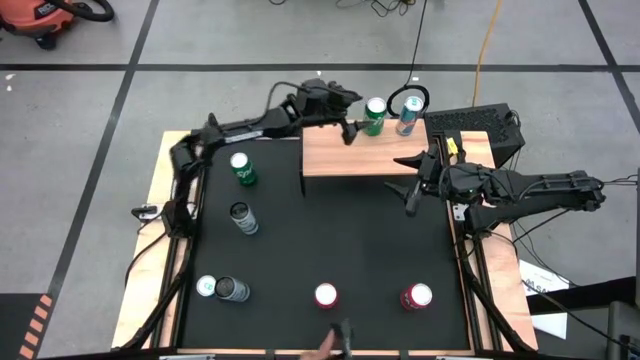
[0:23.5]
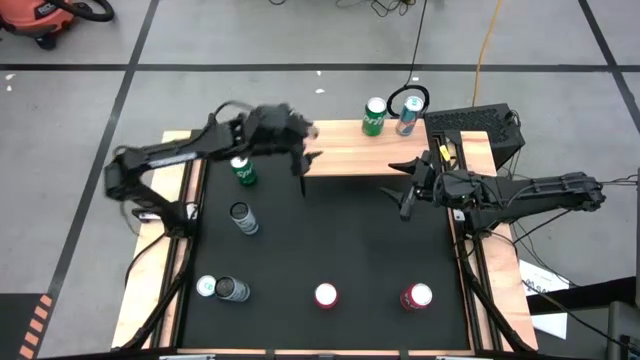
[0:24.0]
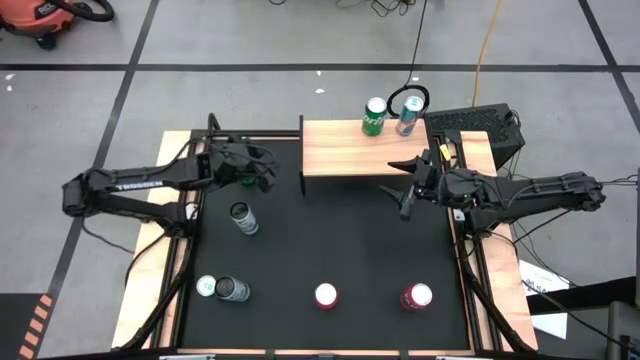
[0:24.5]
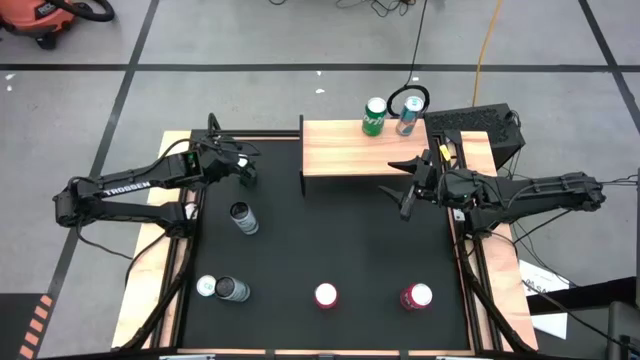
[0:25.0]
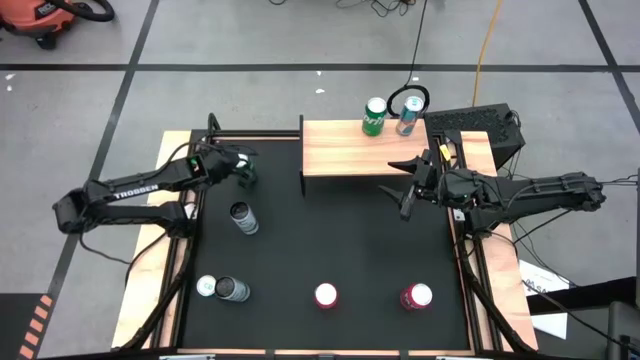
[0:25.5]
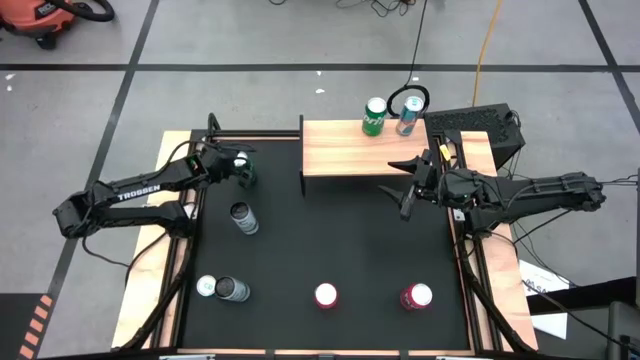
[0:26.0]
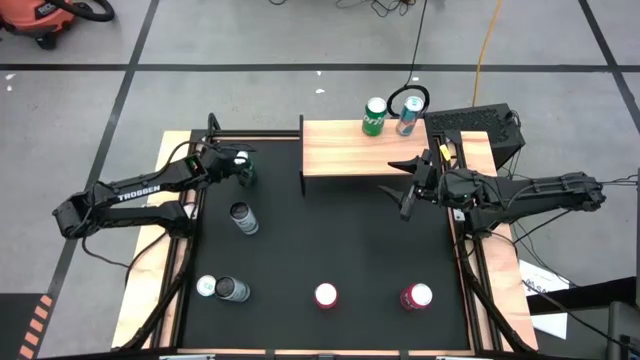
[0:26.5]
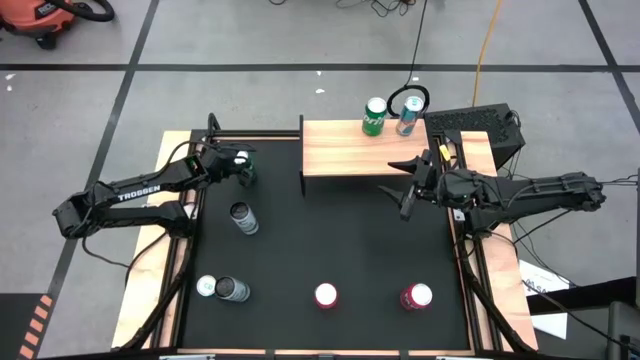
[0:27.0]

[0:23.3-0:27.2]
Task: Place canned beverage on shelf
Put the green soda can on the shelf aligned with the other green soda can

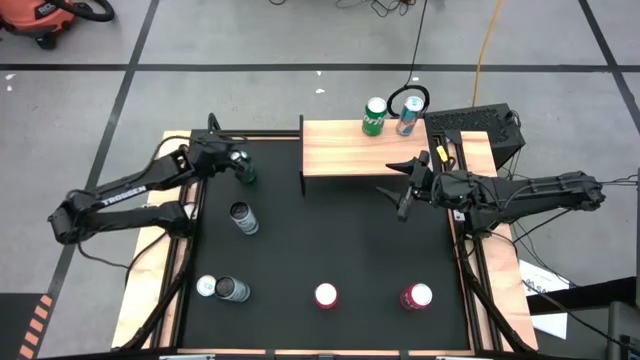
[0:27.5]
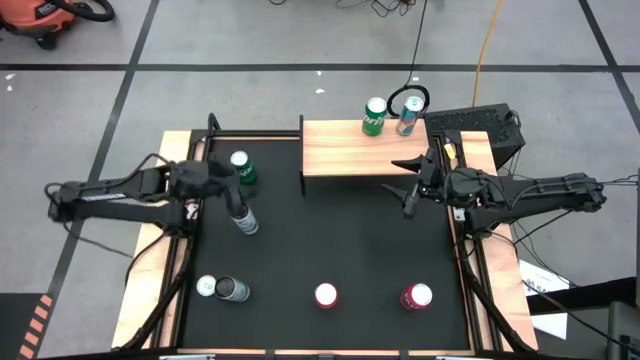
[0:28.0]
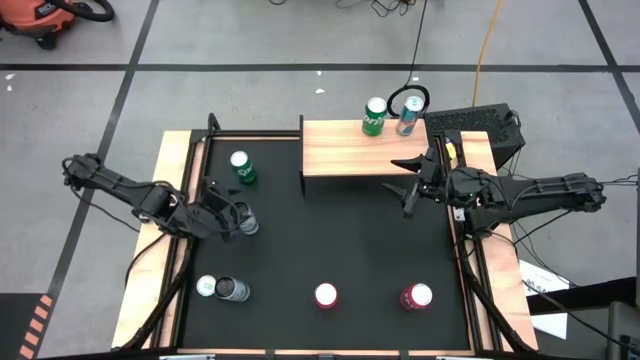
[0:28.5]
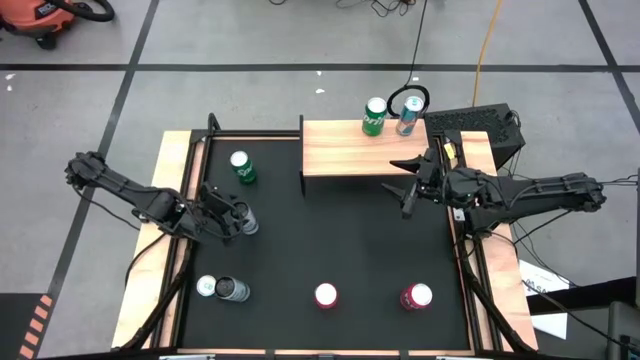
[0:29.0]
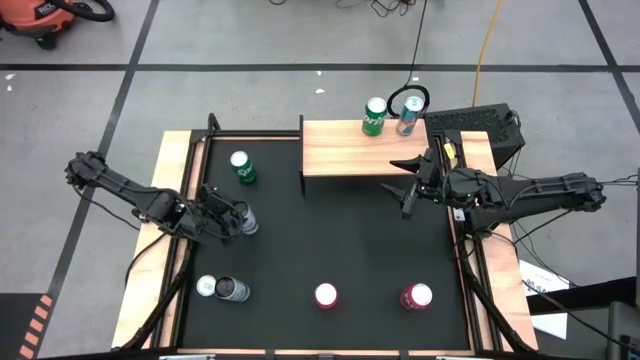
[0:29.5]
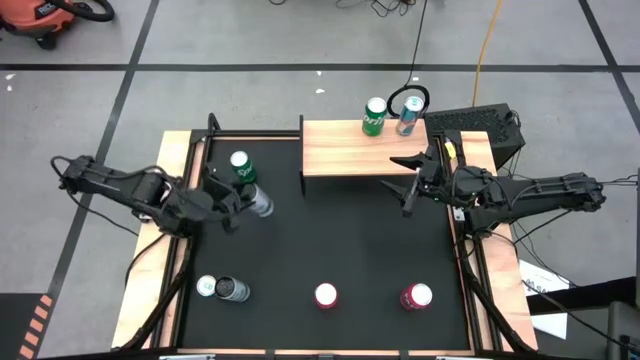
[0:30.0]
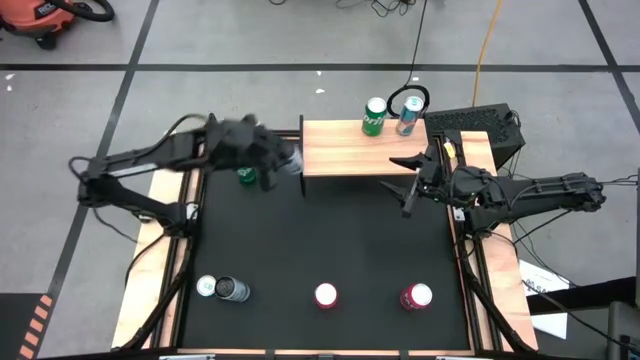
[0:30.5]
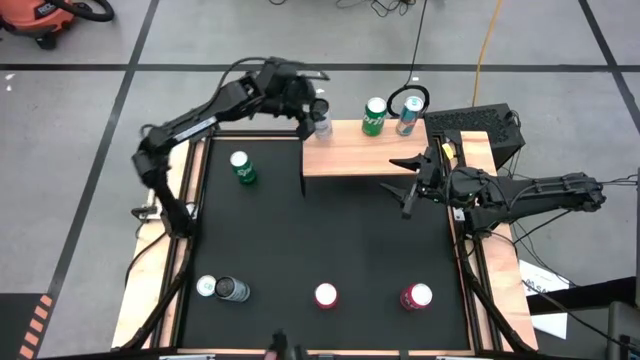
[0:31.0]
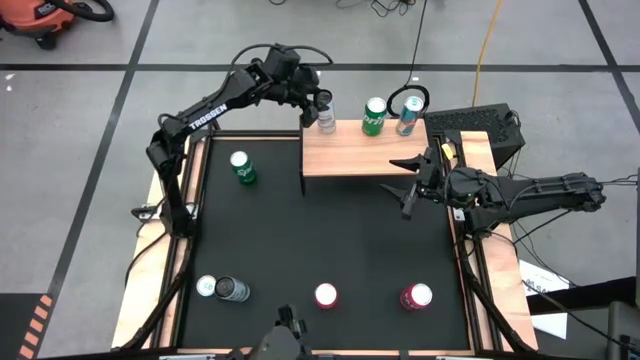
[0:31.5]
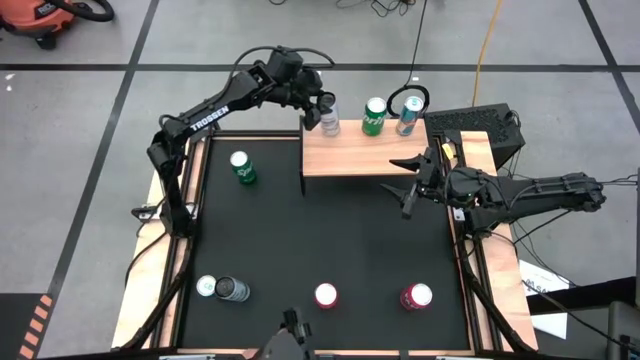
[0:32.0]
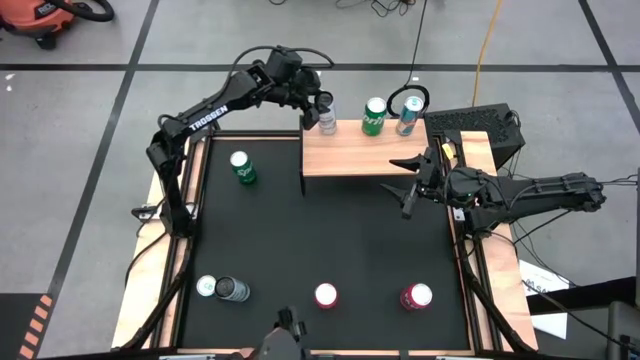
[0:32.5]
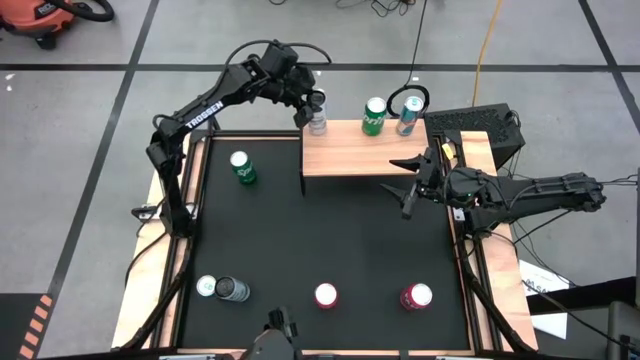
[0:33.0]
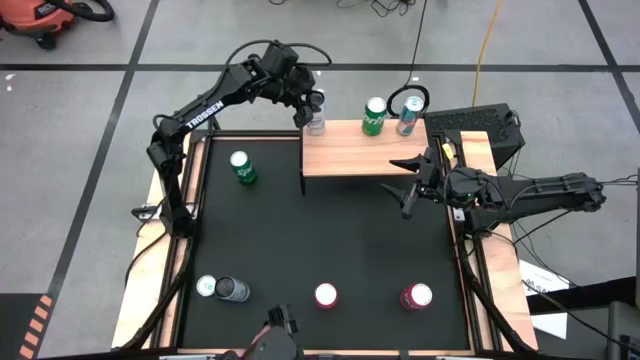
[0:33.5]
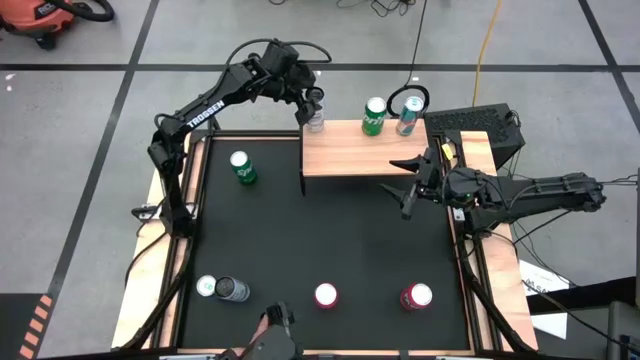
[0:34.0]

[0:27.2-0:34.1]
Put the top black soda can on the shelf

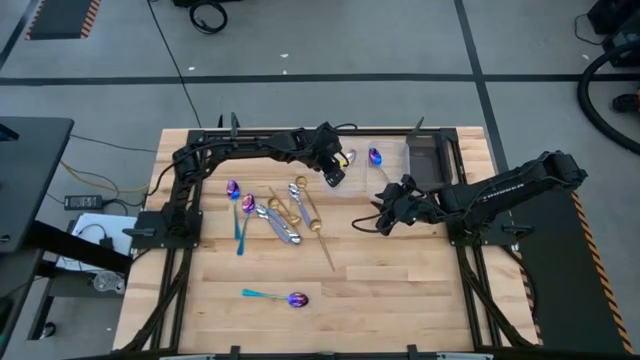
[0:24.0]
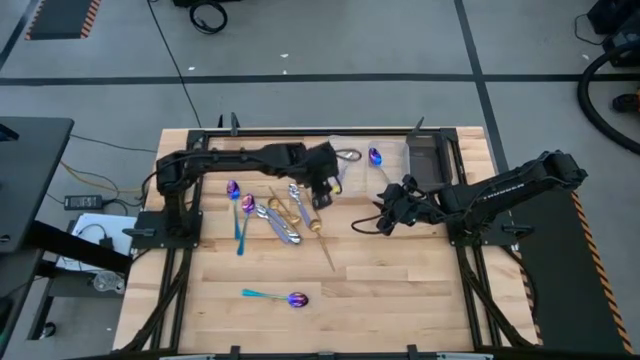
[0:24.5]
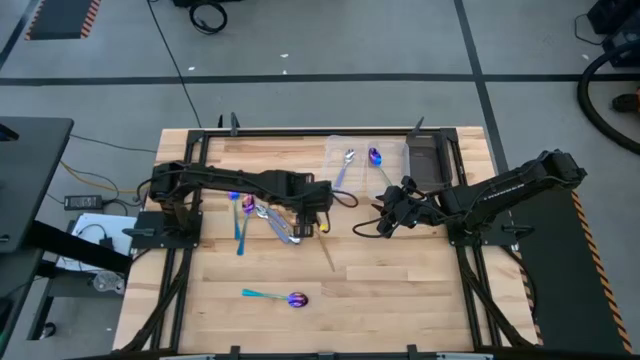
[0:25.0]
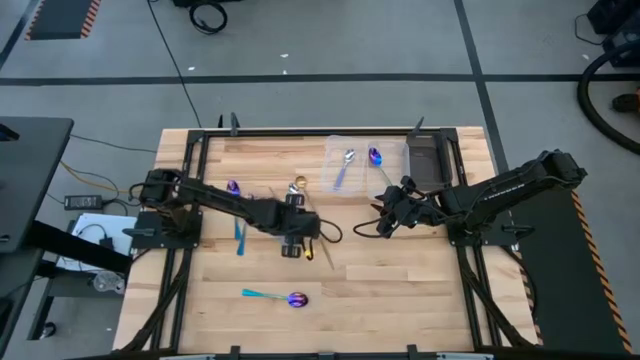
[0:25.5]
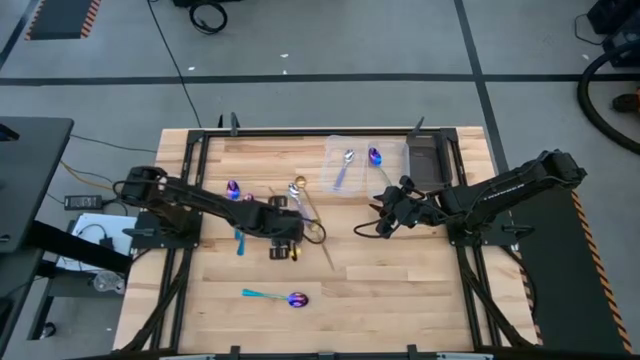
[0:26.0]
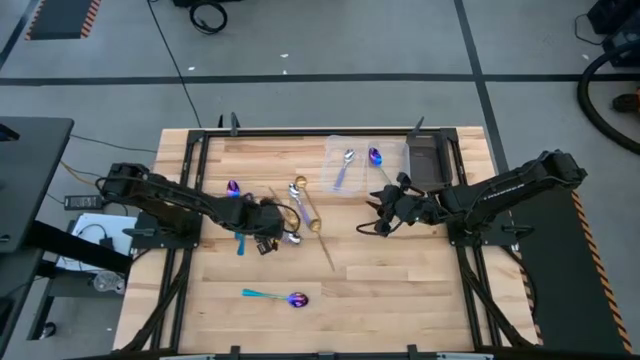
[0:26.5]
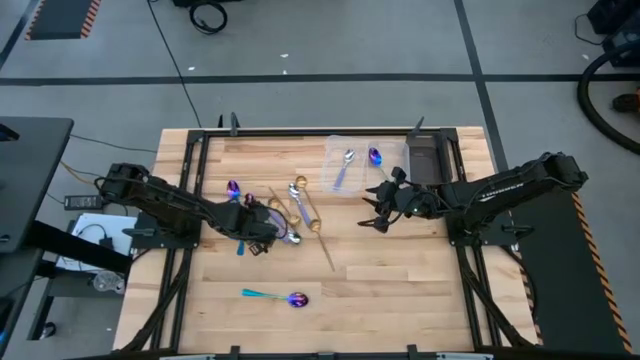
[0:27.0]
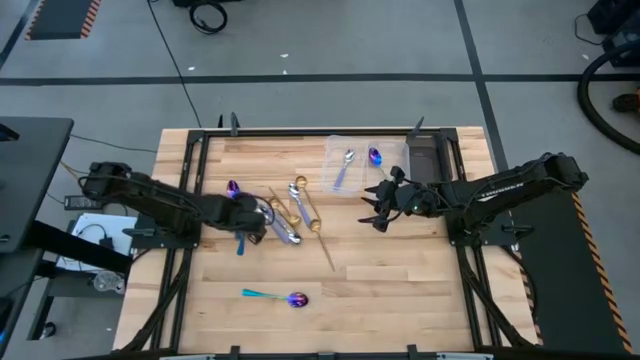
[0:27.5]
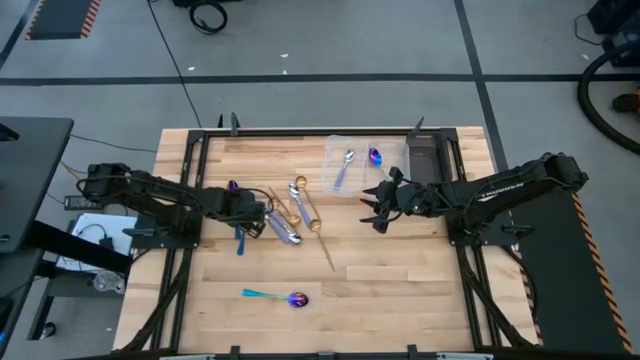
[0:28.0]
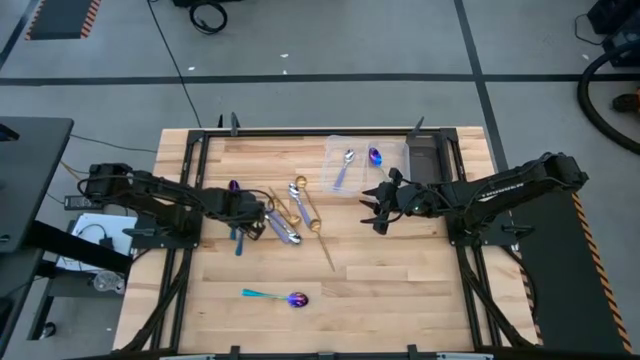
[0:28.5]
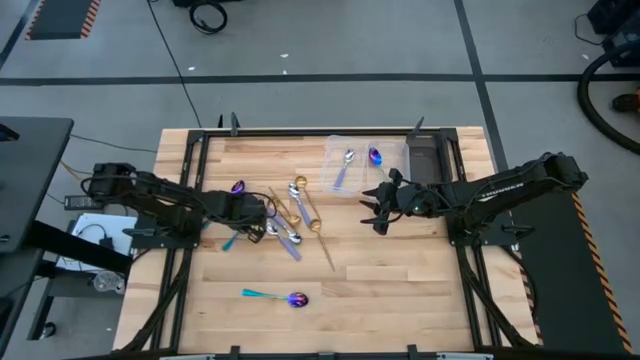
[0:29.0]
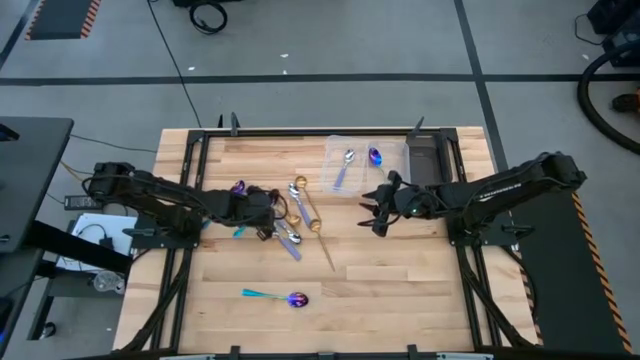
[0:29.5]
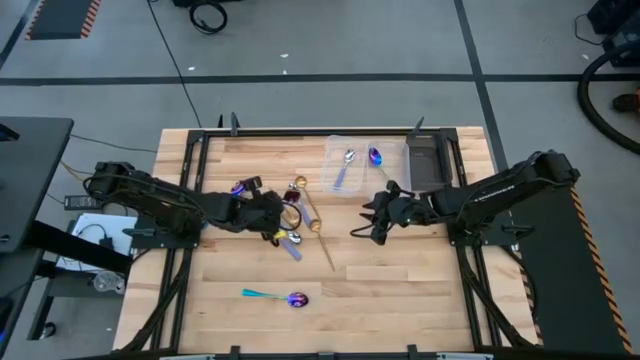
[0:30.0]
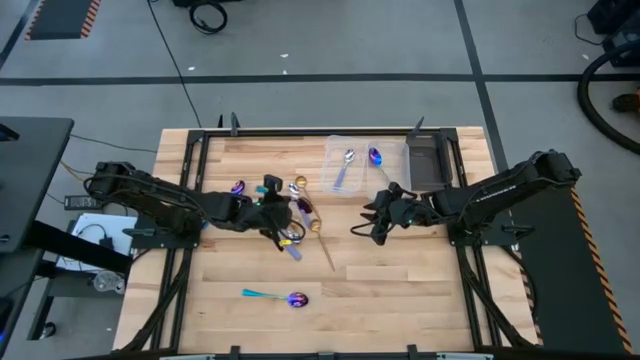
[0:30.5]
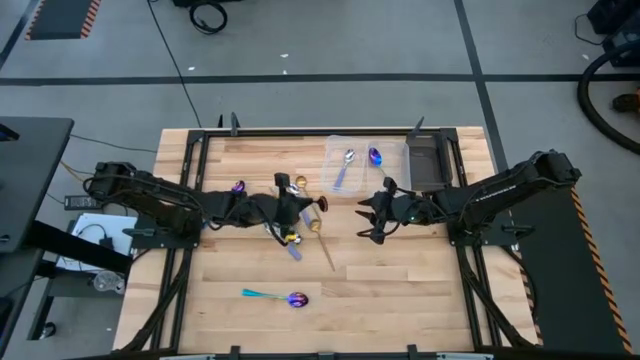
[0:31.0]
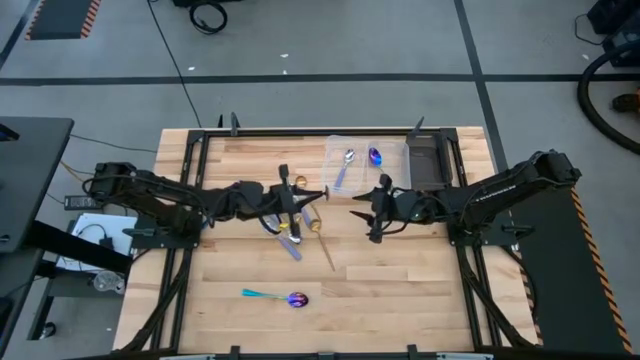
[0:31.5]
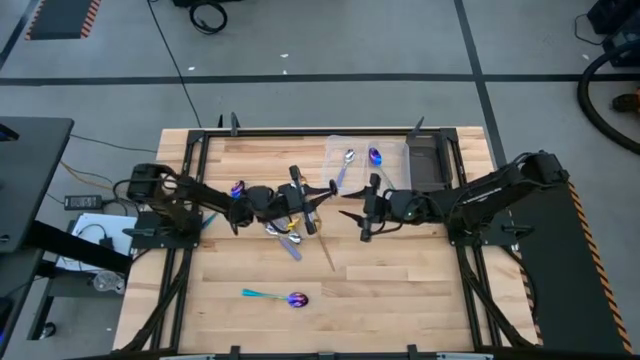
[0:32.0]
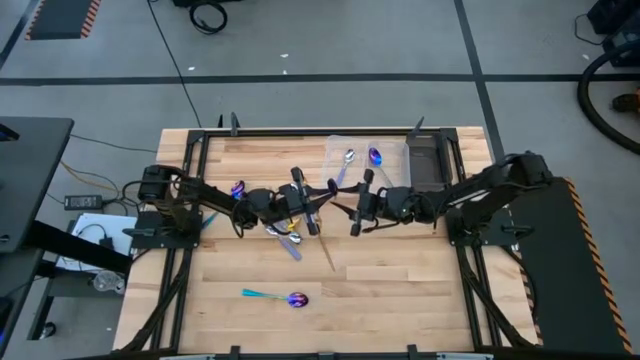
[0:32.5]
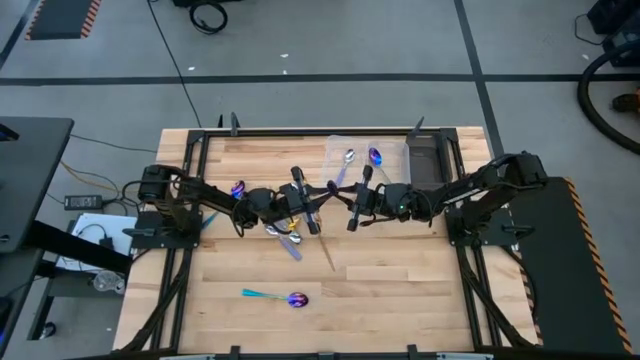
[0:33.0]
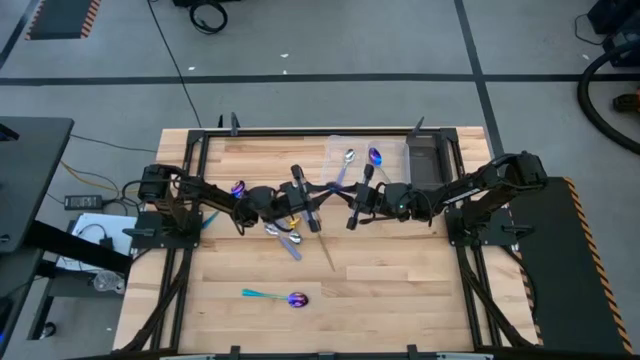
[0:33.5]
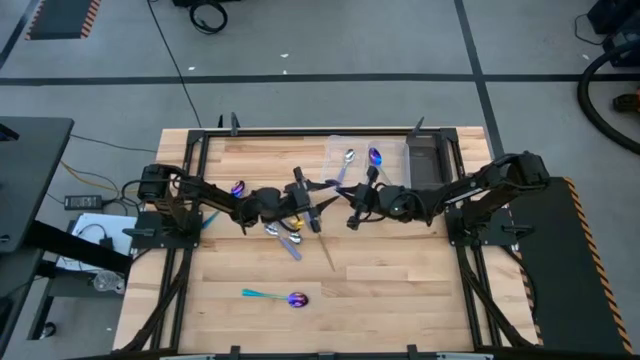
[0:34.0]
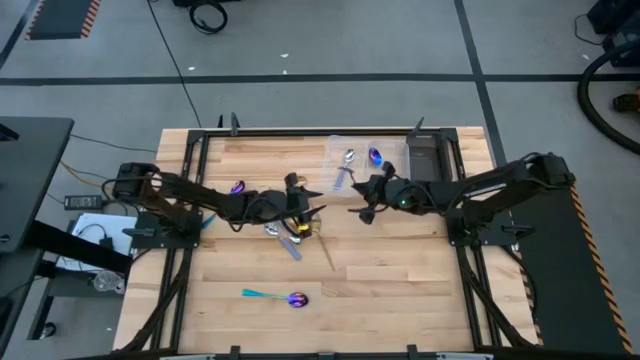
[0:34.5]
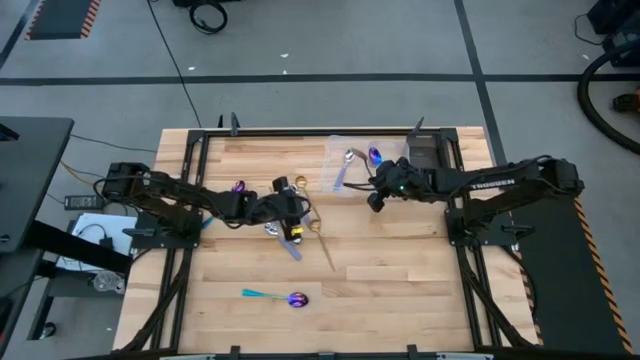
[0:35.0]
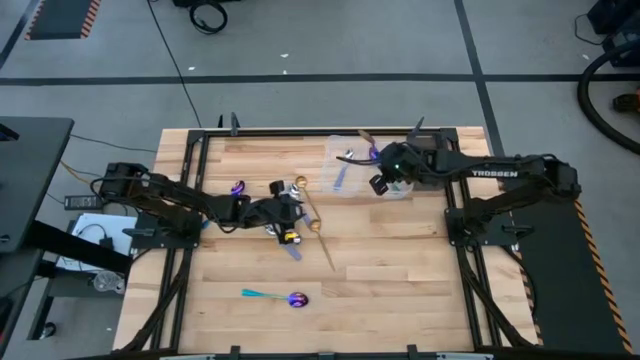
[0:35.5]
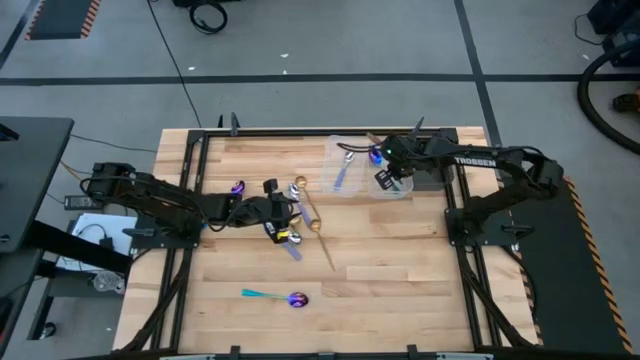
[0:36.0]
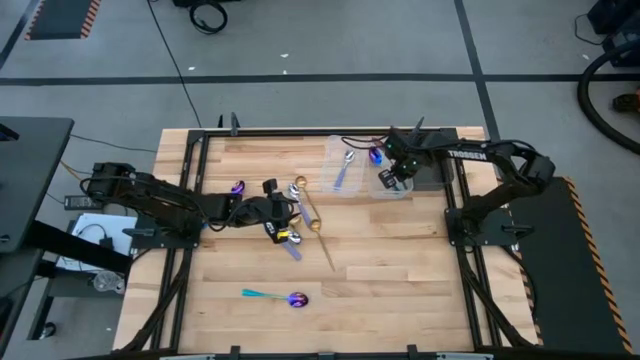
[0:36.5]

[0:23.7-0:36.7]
Task: Sort silverware by color (type)
Put the middle purple spoon into the right transparent bin
